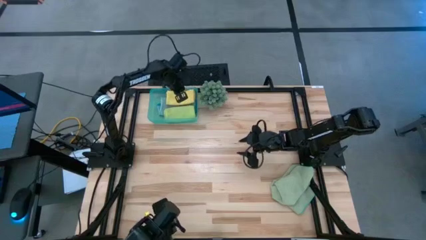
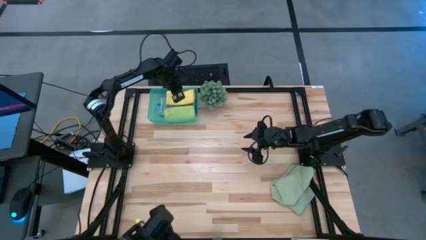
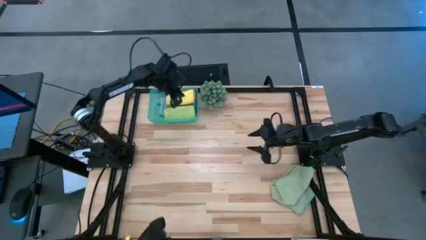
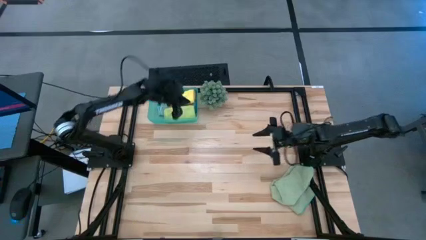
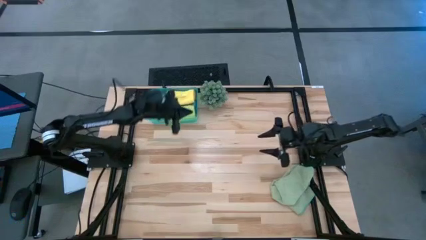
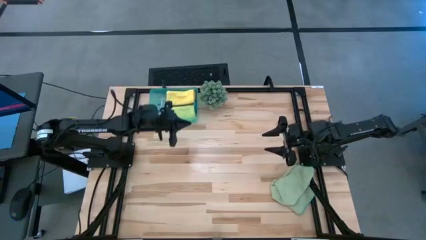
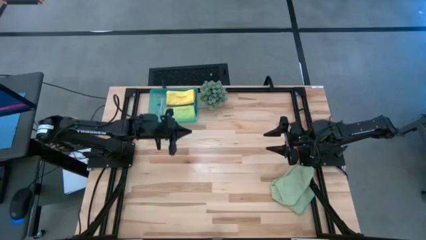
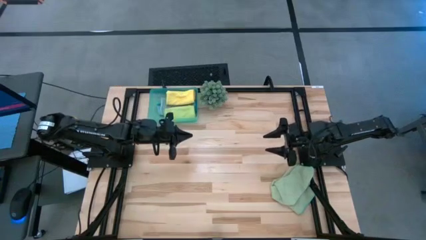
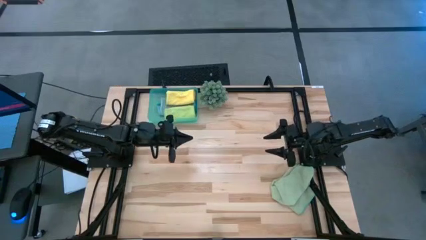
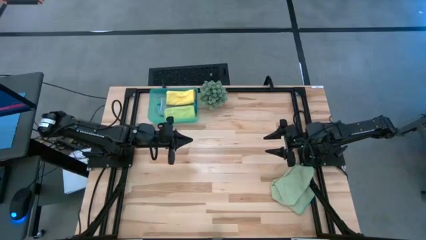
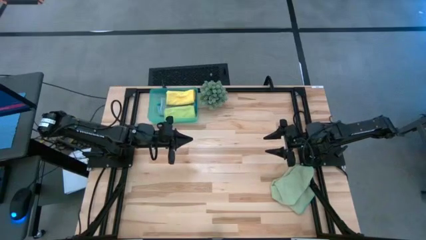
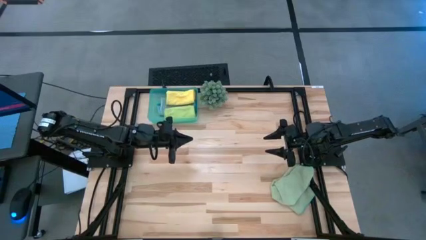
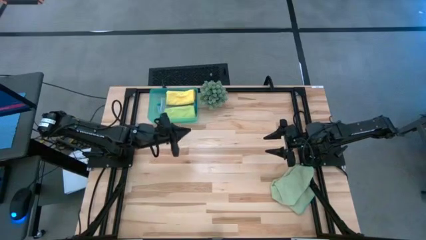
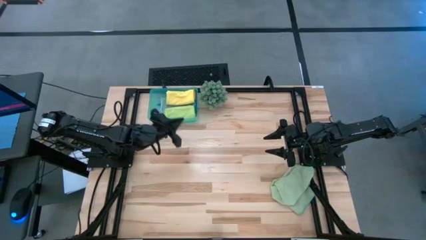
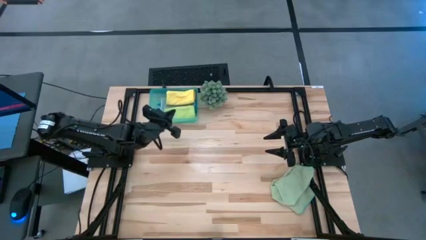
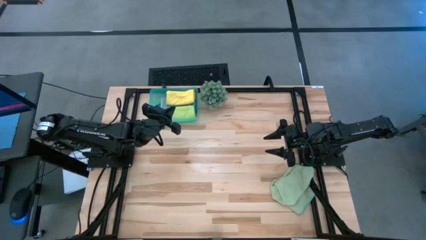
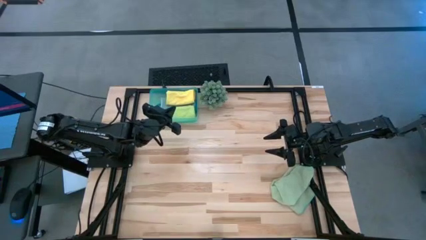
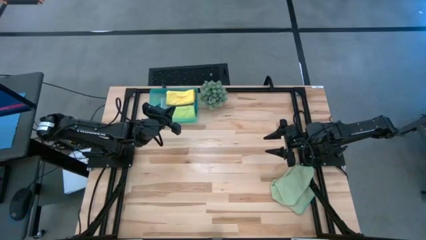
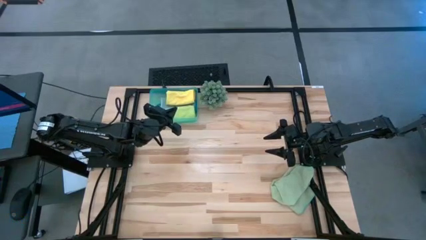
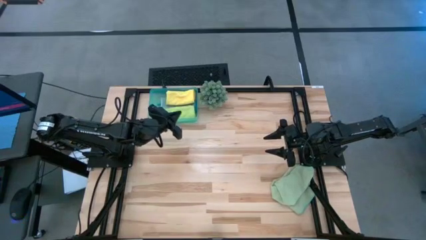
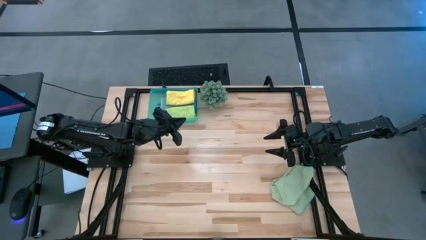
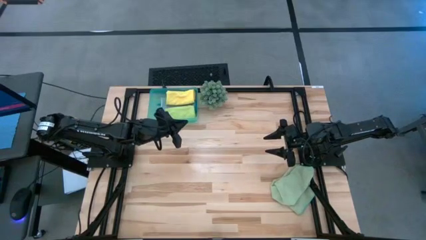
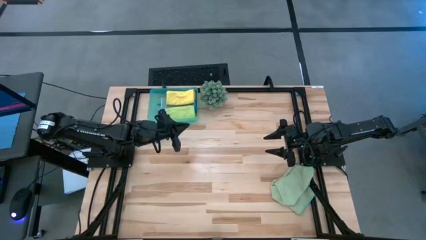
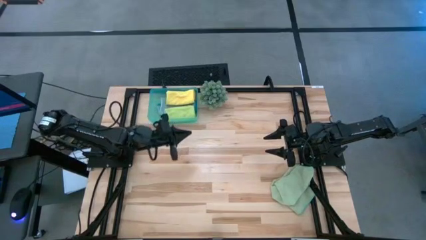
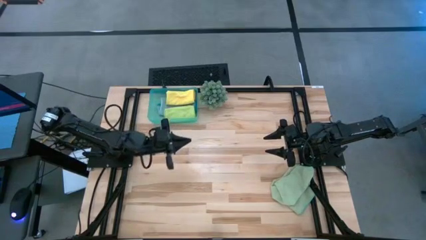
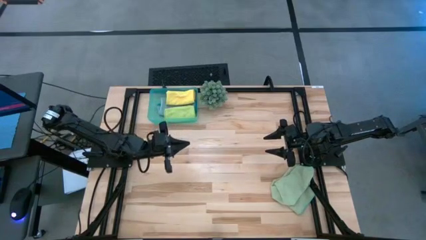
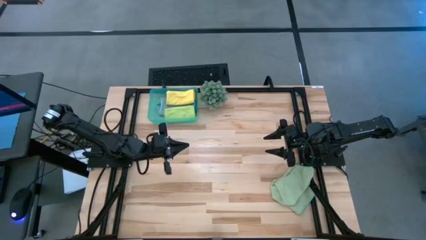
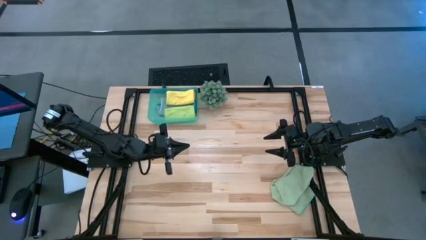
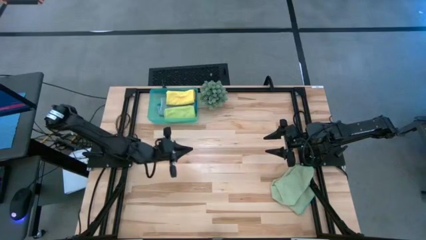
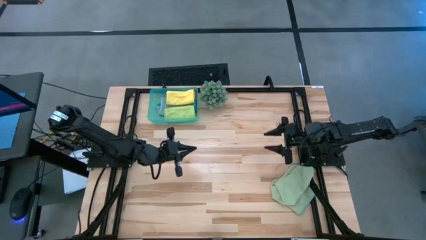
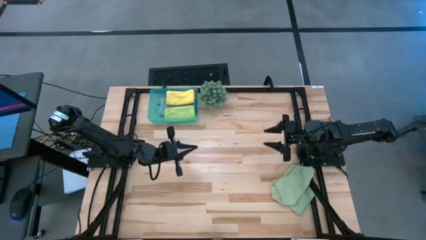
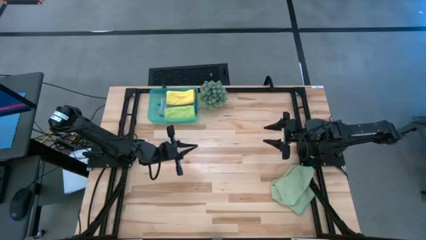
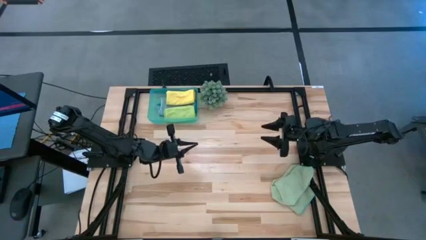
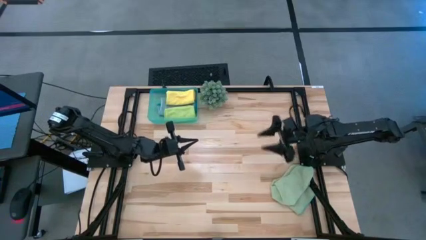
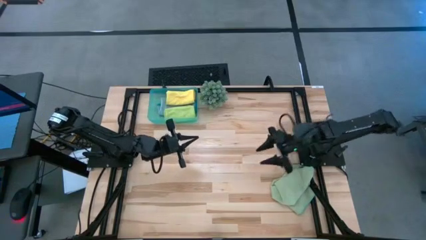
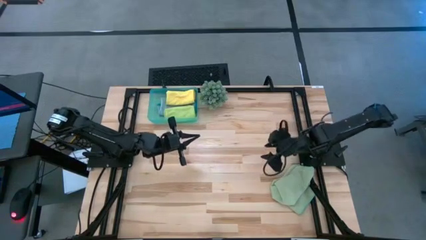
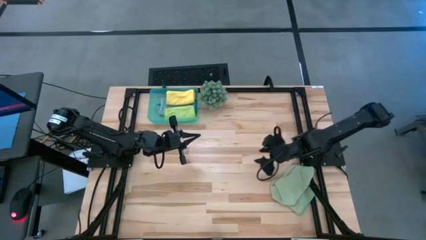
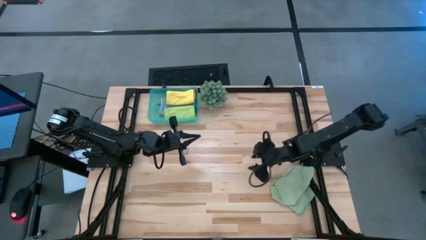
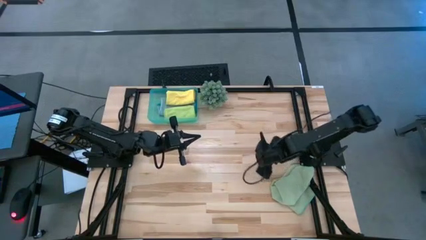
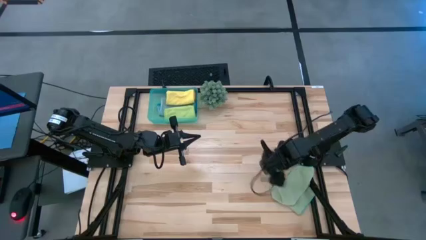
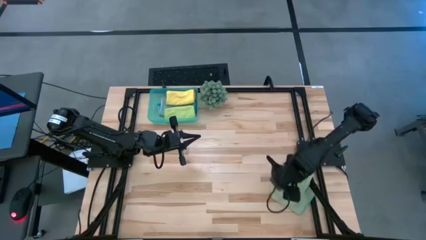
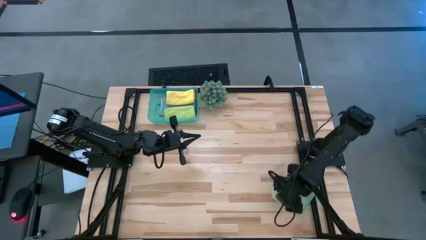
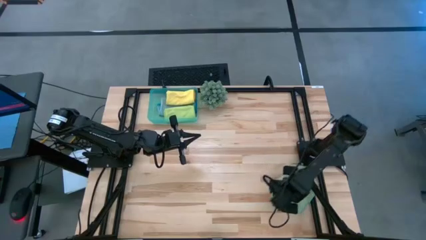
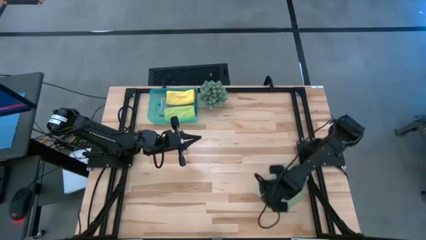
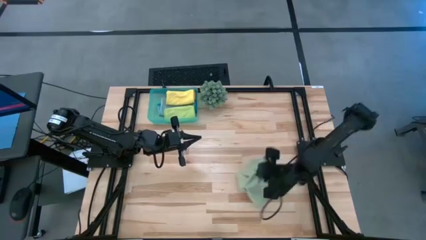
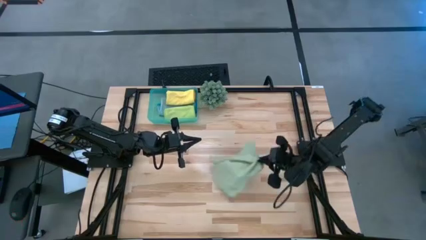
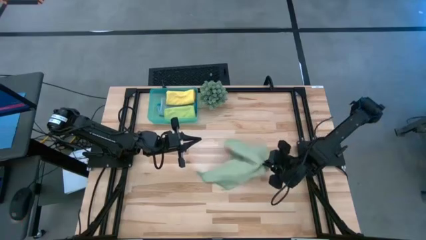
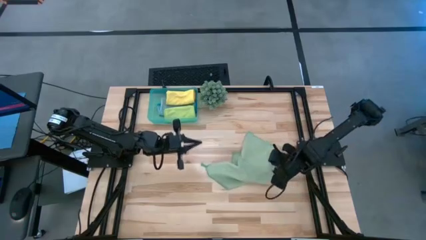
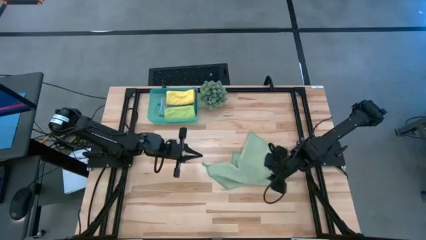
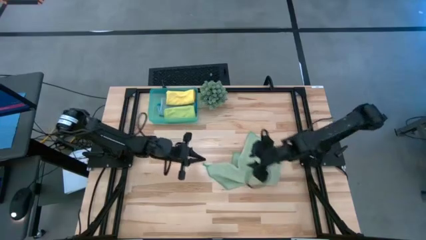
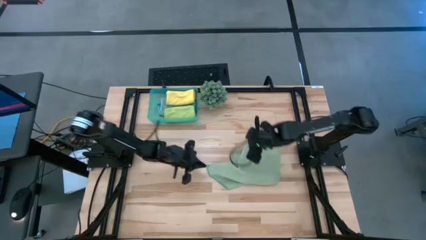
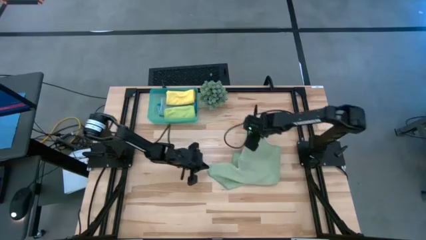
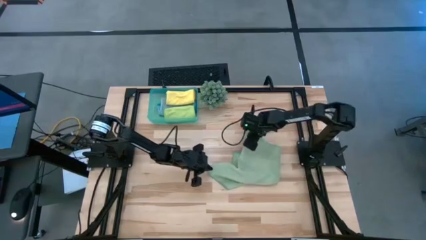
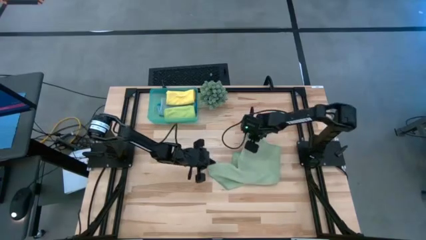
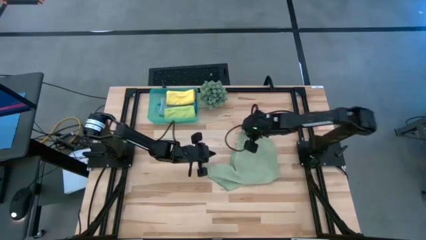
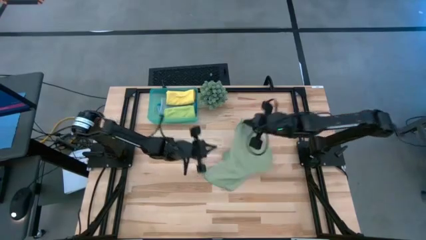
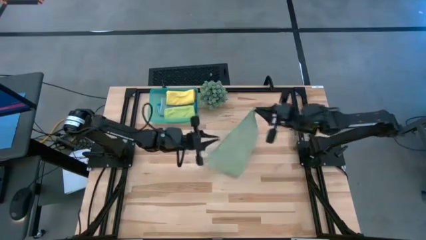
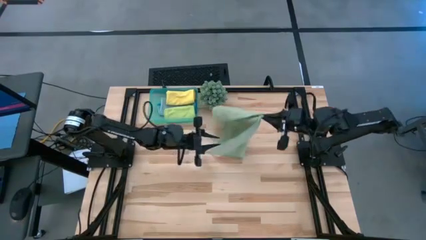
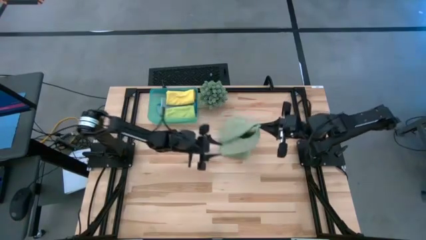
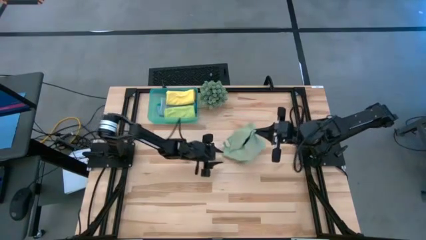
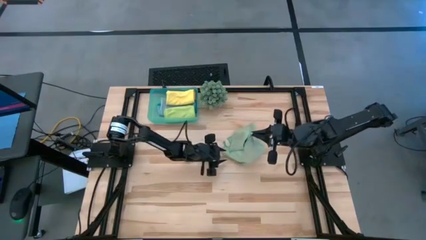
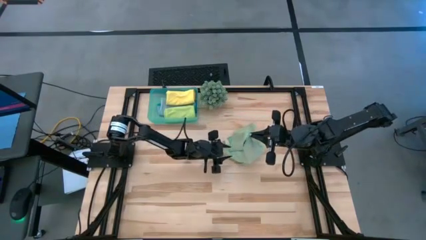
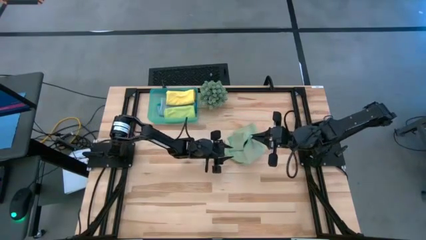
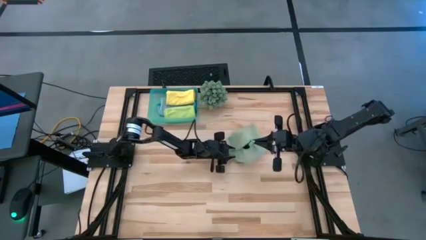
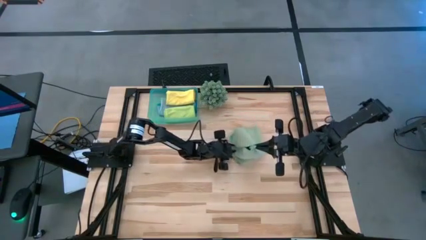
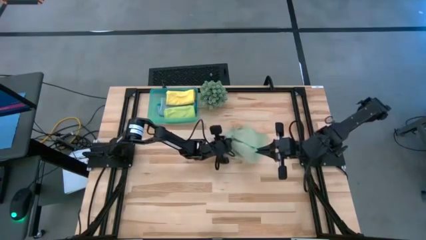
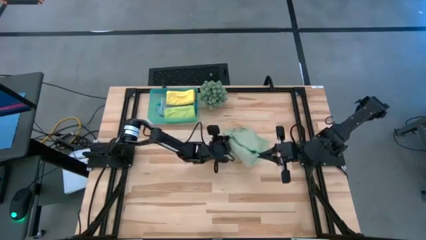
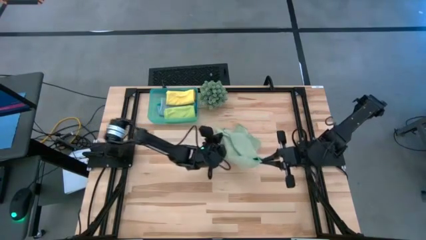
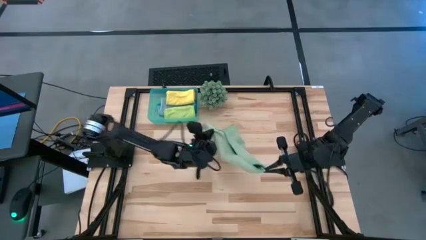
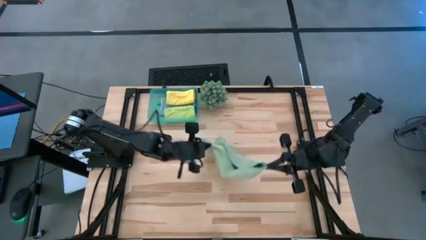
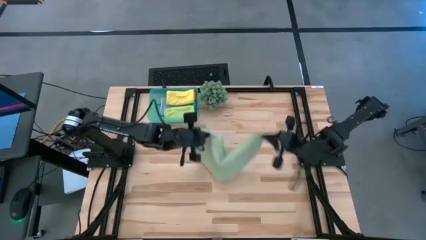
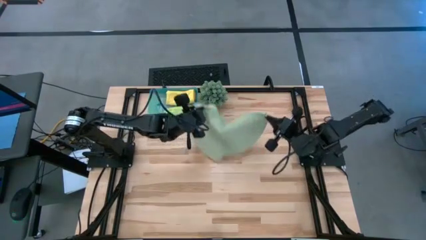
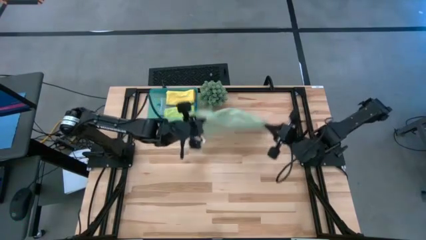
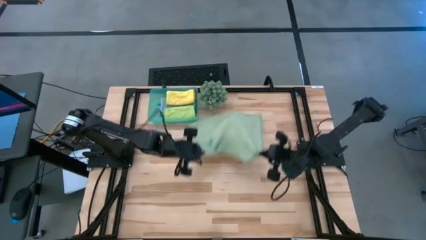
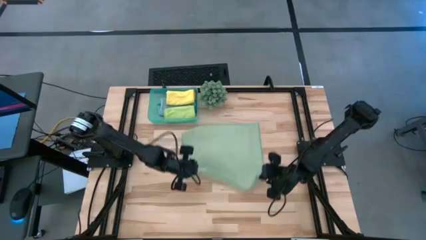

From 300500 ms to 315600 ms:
Task: Fold microfiber towels
Fold the green microfiber cloth
